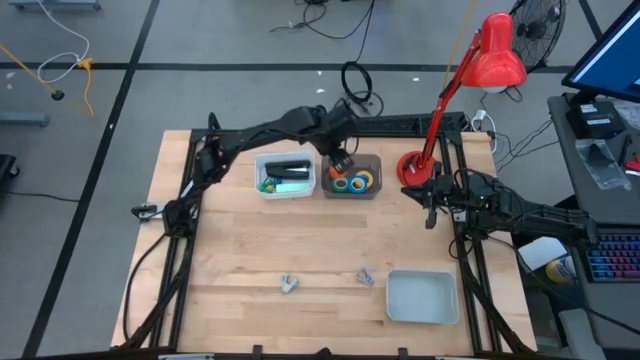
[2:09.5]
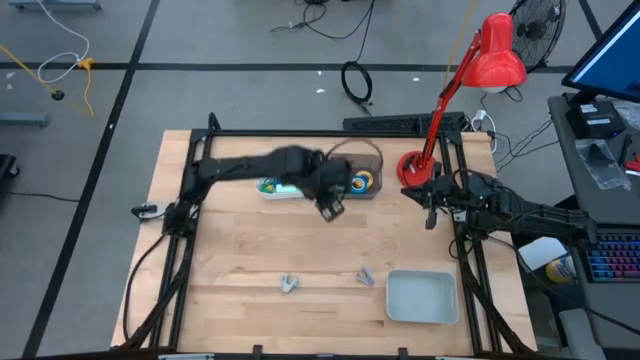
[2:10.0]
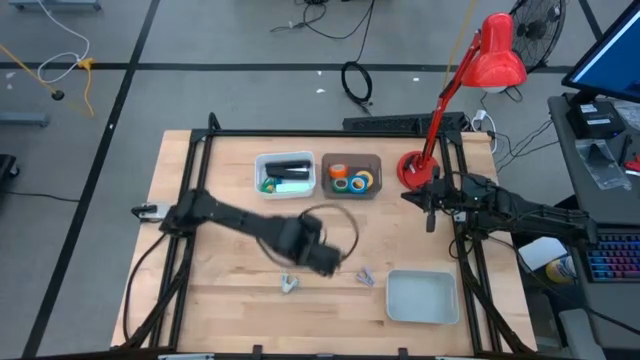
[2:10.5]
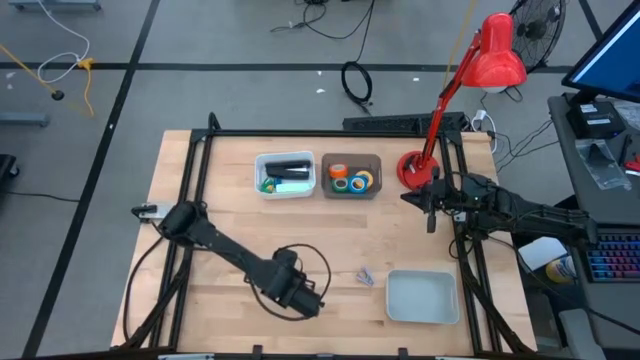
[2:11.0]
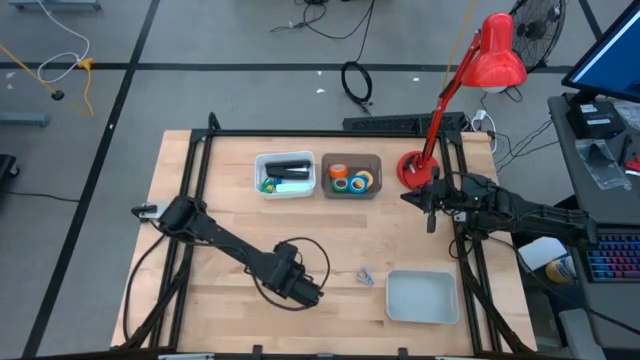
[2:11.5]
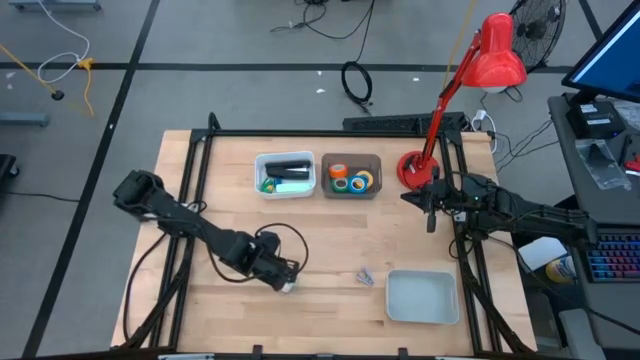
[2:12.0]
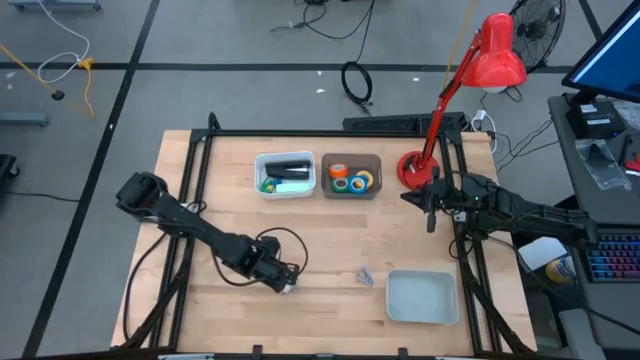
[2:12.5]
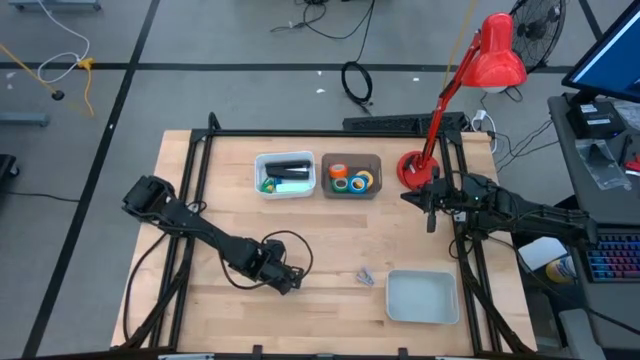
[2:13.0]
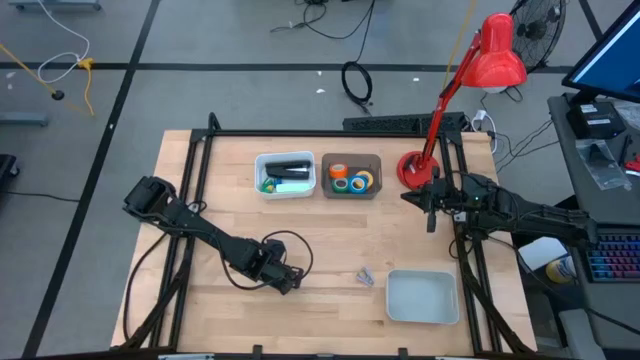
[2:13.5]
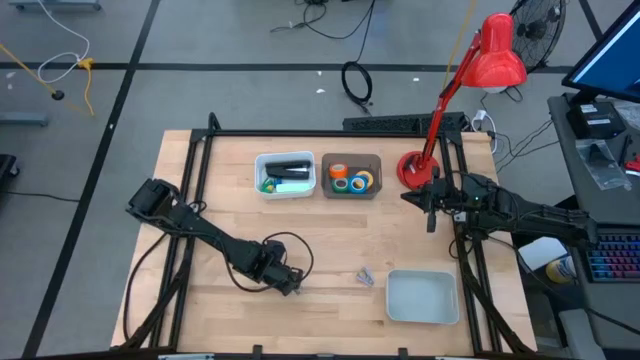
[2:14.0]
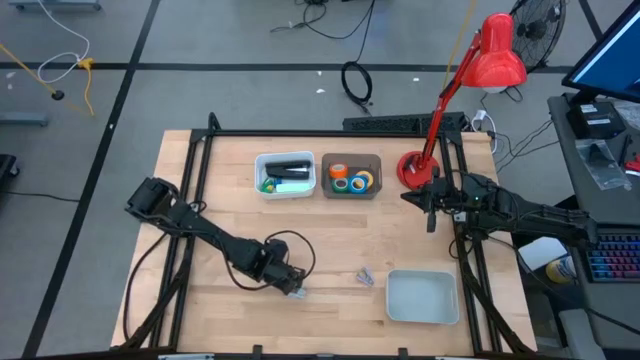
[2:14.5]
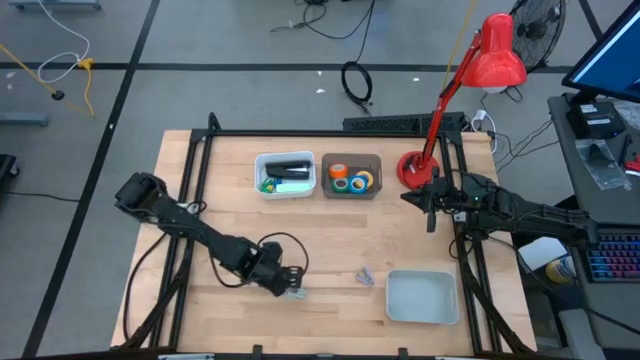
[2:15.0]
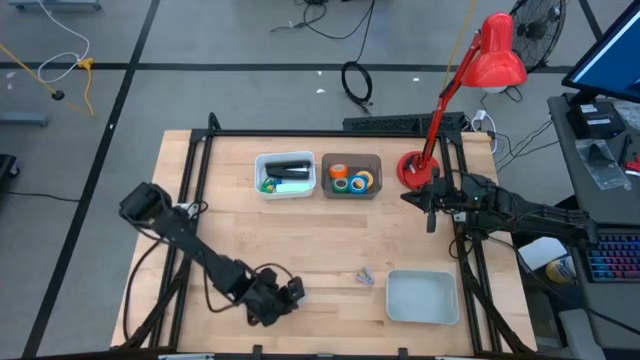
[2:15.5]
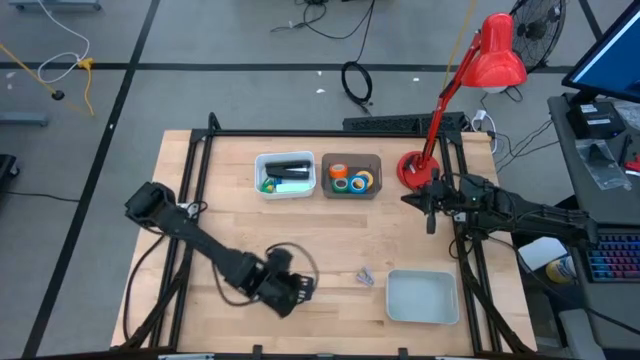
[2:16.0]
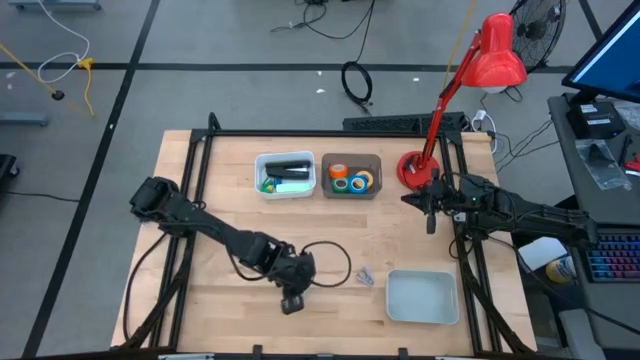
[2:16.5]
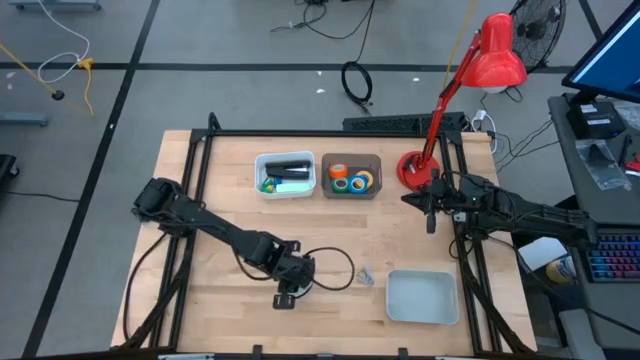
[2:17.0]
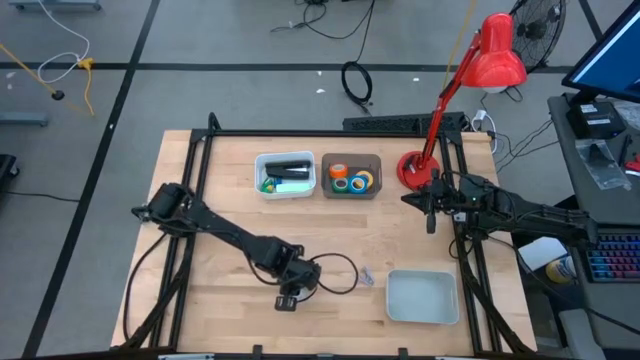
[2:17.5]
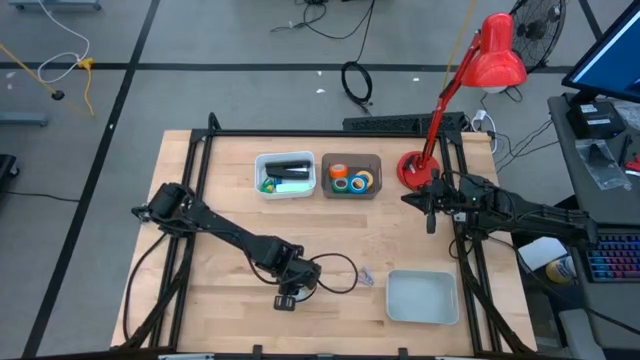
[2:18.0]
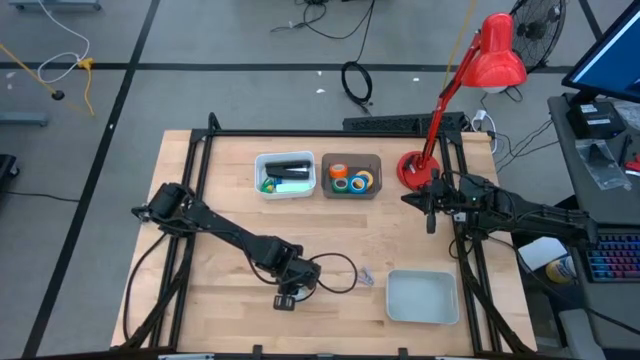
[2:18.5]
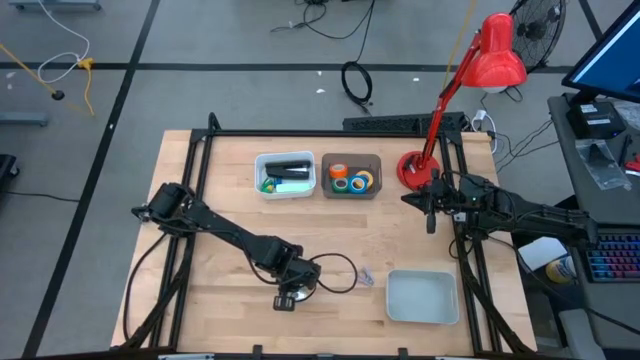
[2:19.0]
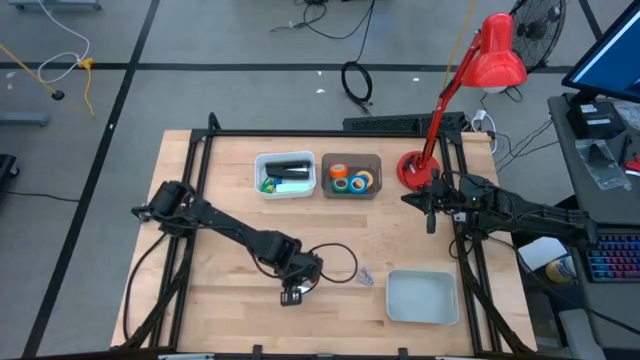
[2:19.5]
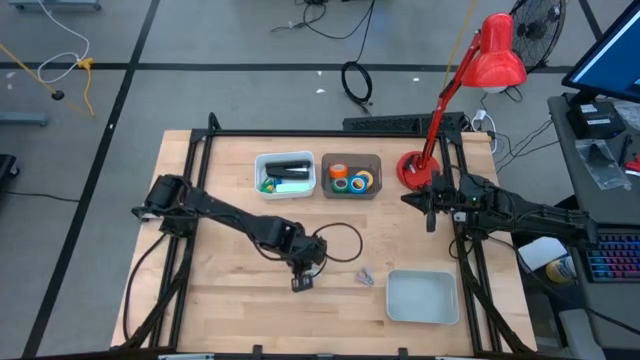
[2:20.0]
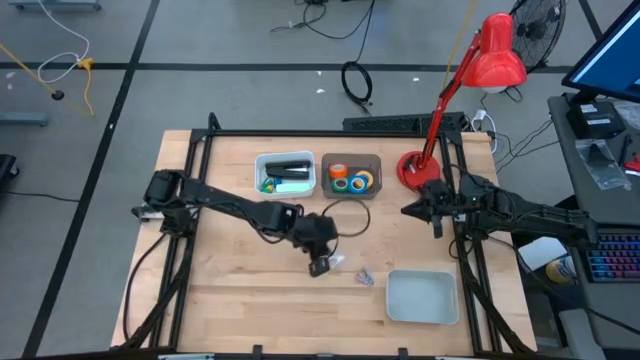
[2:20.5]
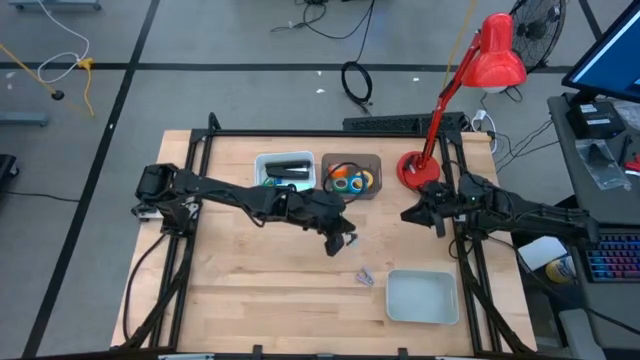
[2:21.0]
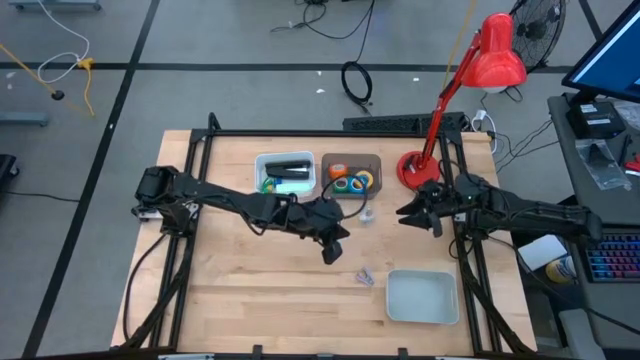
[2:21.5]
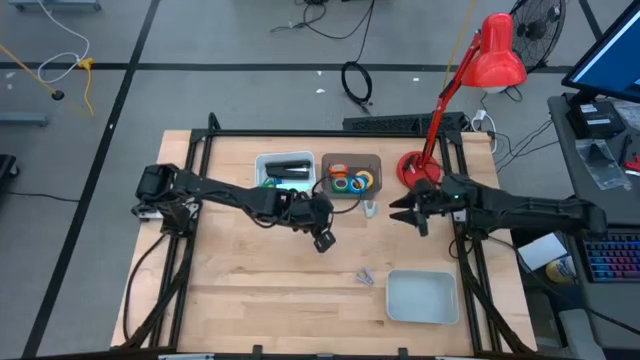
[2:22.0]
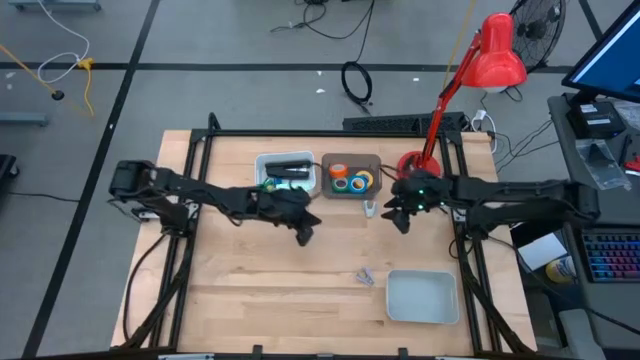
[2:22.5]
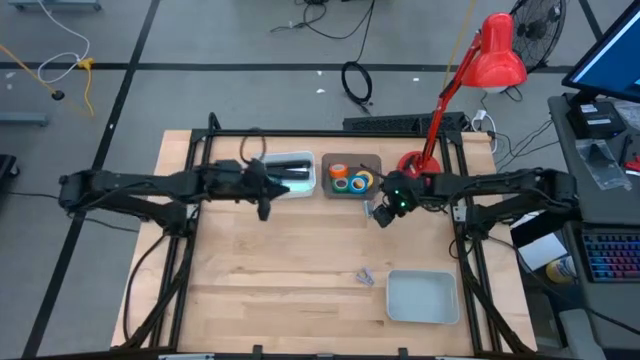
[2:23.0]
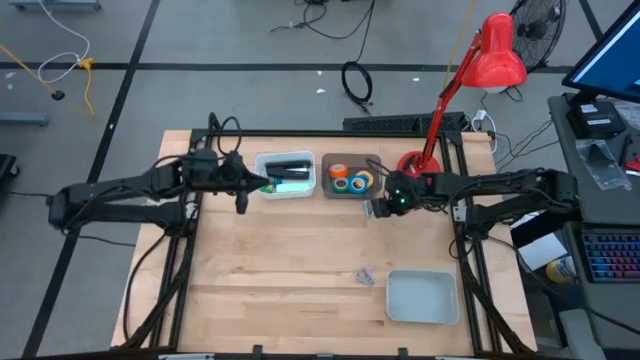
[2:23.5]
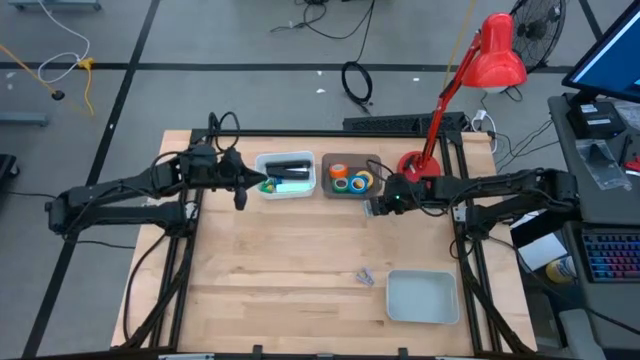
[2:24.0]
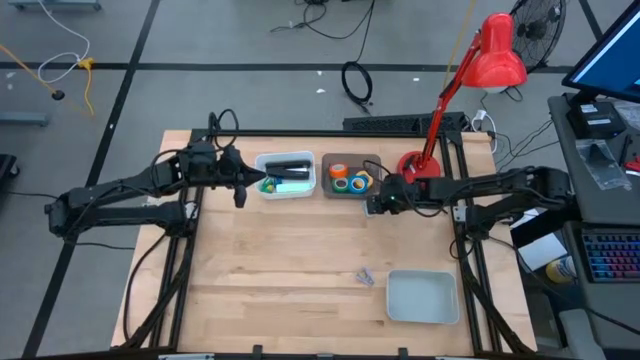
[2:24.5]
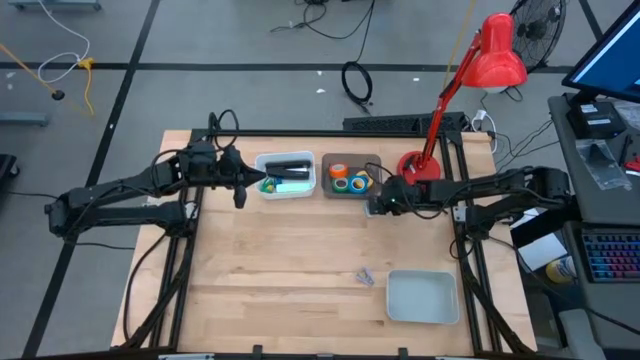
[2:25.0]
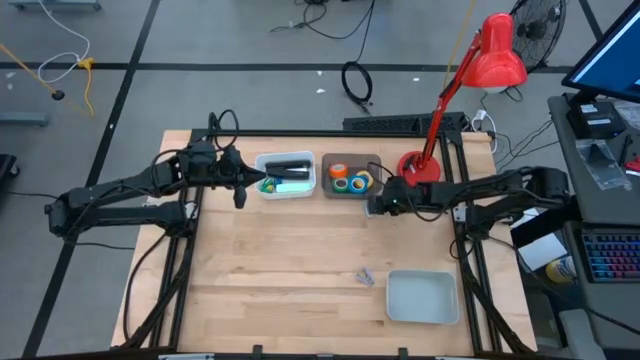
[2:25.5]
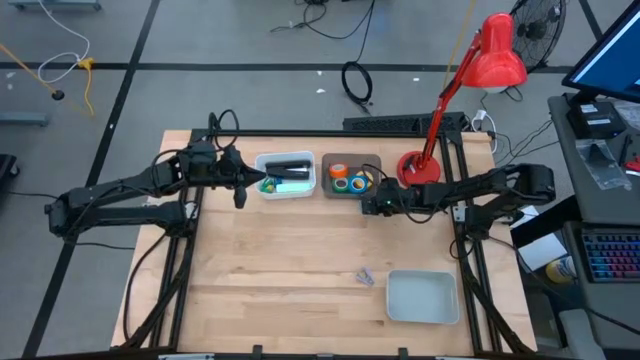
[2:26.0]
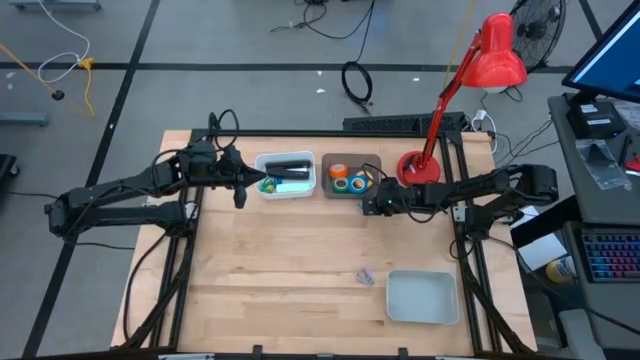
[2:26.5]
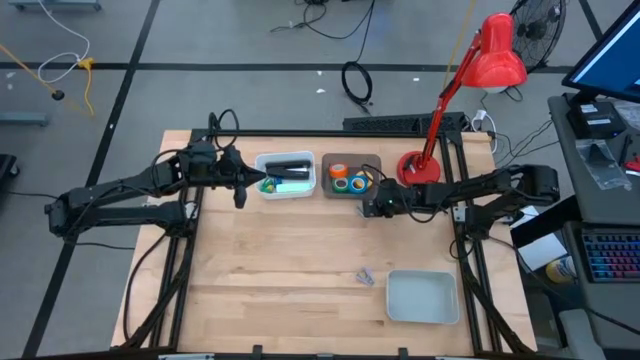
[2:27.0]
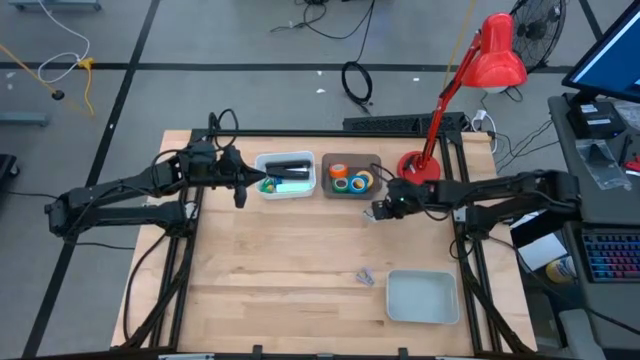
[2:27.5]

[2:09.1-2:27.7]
Task: Pick and place Stapler, Stapler remover, tape
Put the light blue staple remover into the gray bin

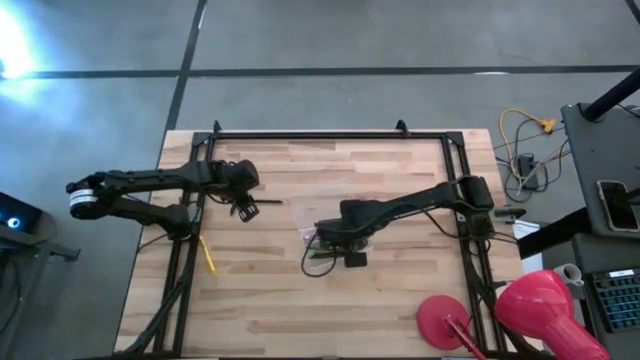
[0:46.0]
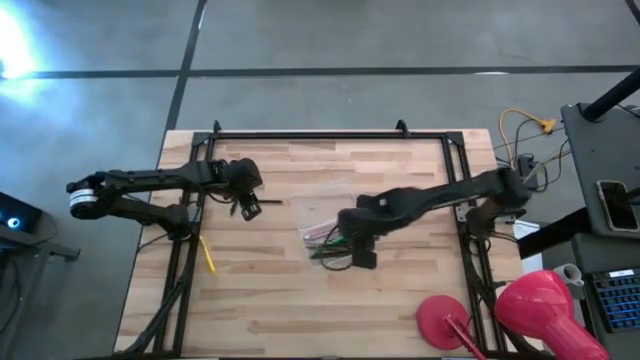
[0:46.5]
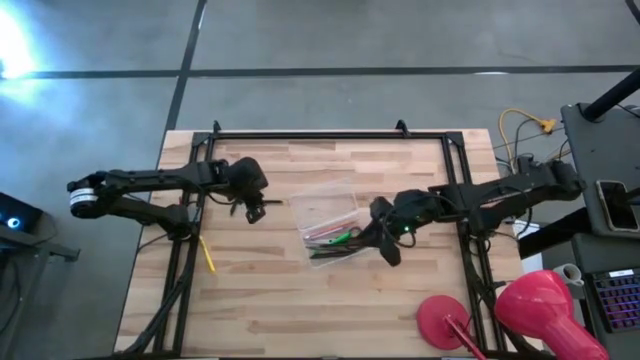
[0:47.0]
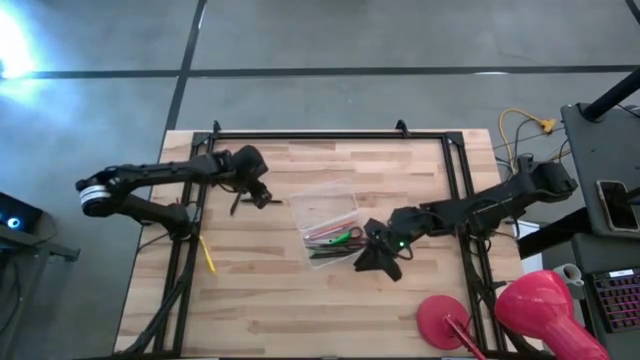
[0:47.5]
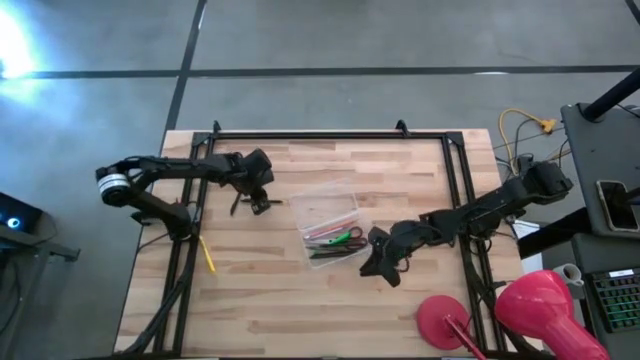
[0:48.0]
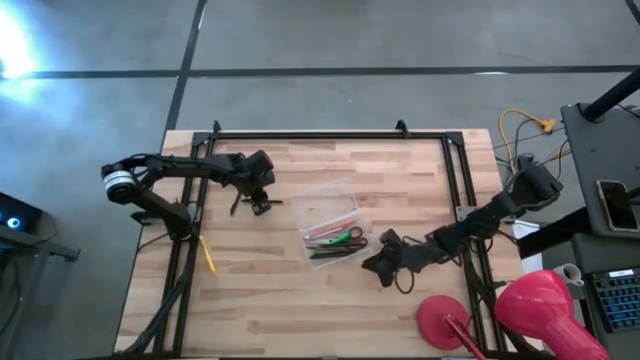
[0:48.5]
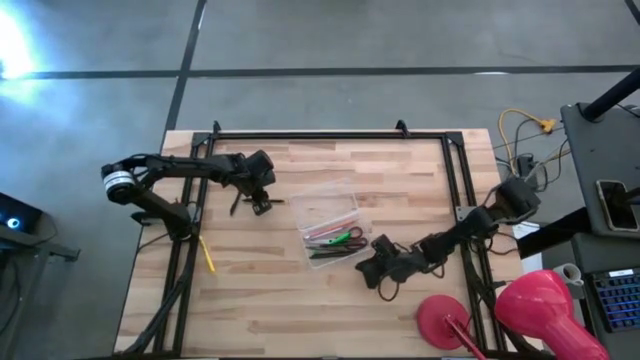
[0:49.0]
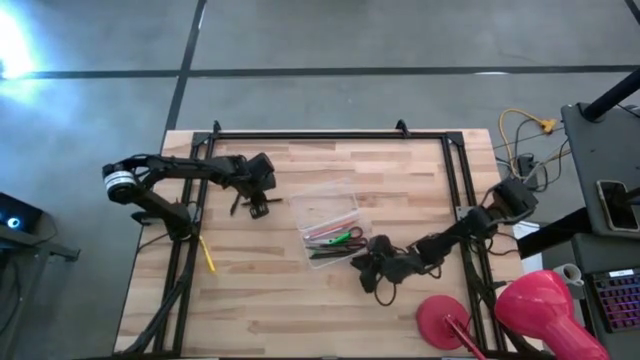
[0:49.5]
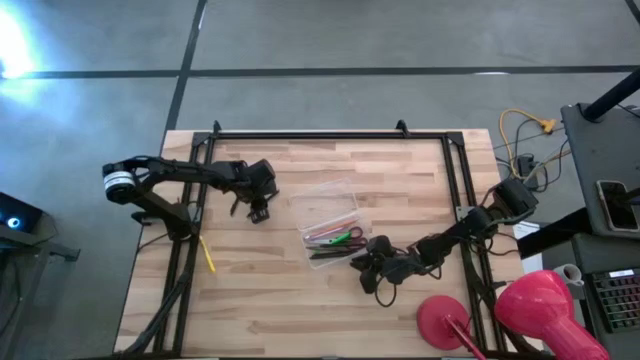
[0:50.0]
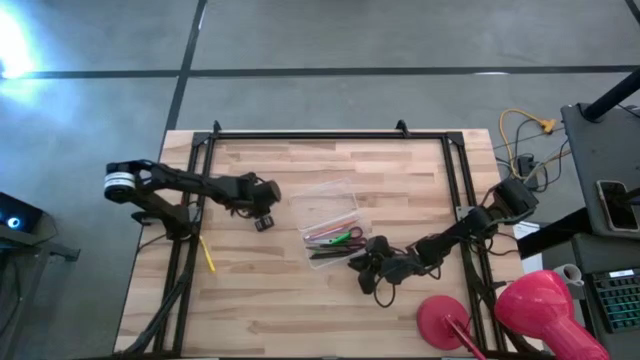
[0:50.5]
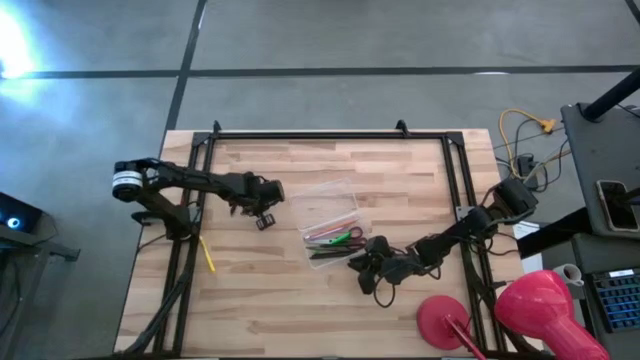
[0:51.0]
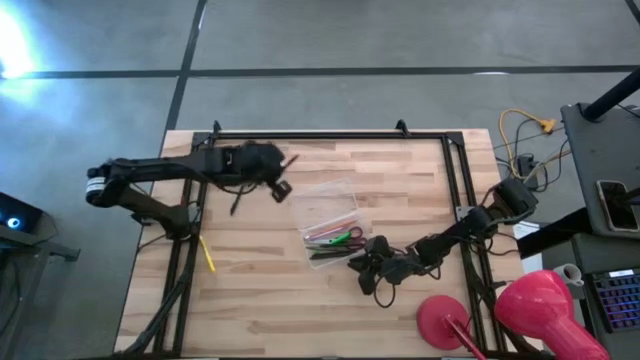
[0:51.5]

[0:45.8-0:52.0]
Task: Pick & place school supplies into a supply box
Put the black pen into the transparent supply box
